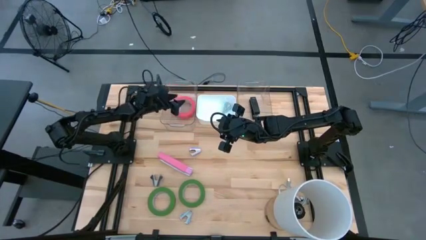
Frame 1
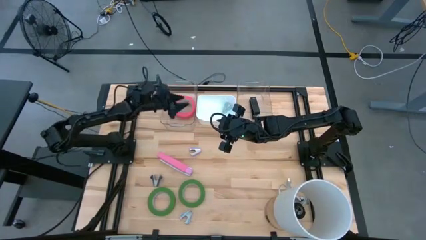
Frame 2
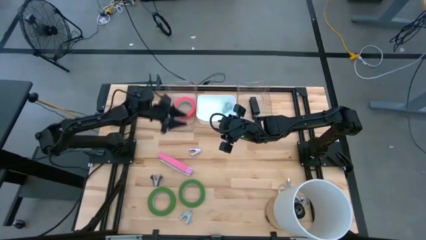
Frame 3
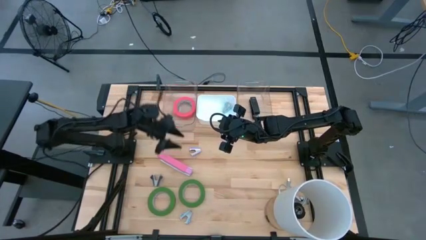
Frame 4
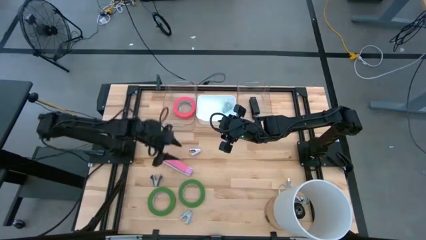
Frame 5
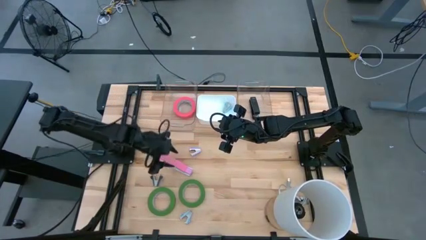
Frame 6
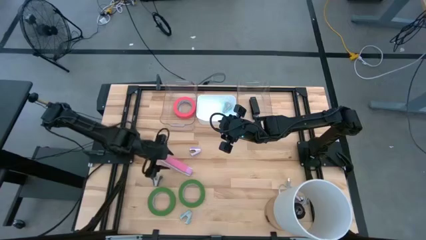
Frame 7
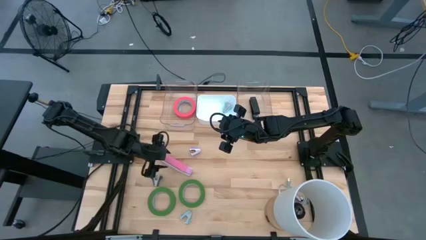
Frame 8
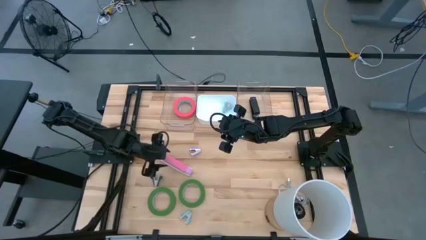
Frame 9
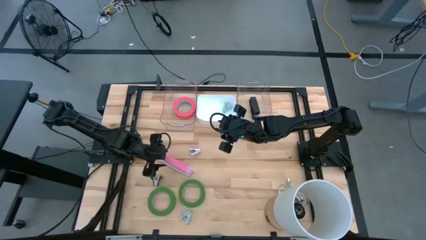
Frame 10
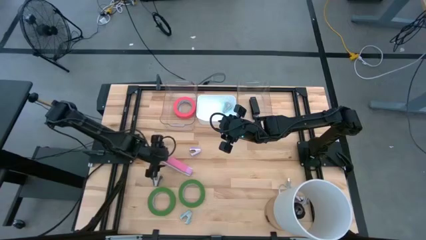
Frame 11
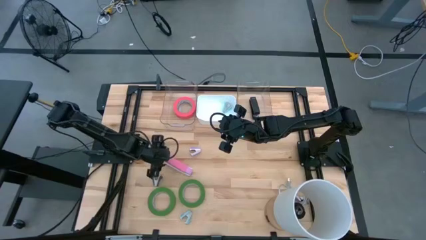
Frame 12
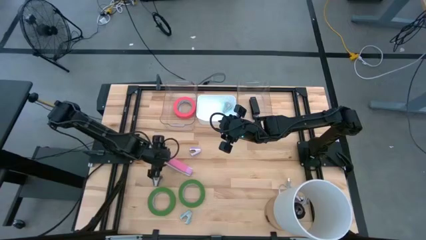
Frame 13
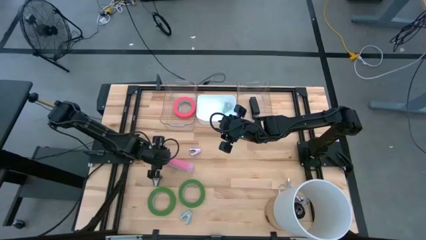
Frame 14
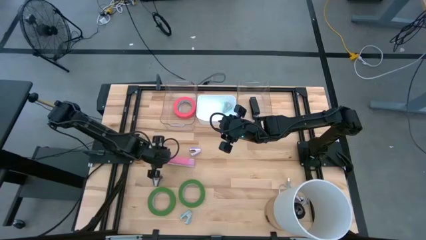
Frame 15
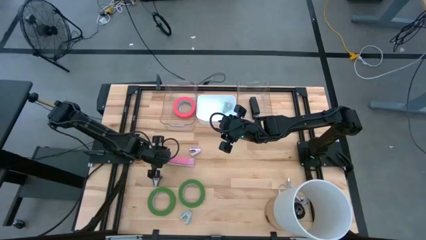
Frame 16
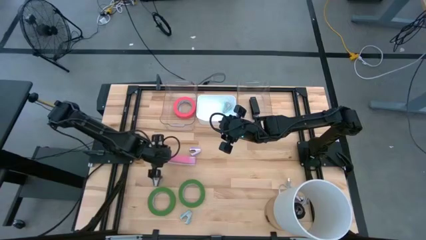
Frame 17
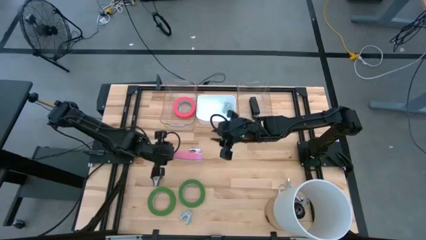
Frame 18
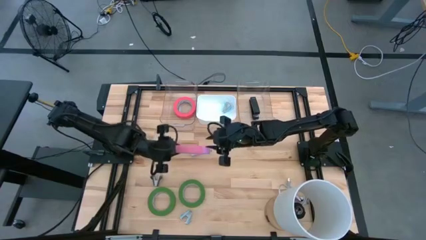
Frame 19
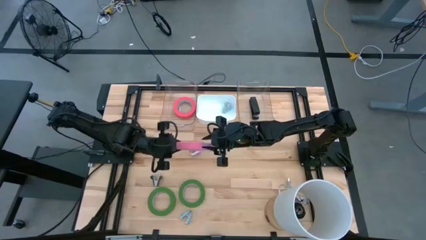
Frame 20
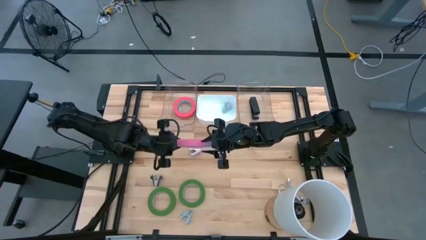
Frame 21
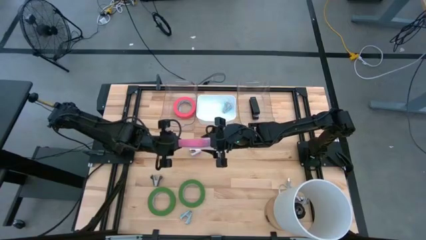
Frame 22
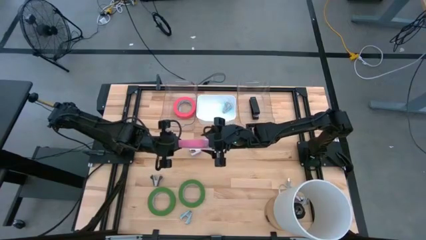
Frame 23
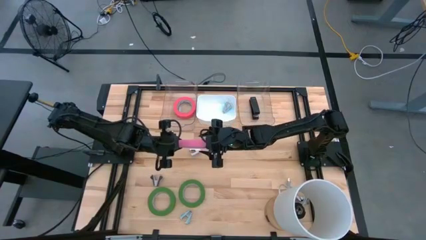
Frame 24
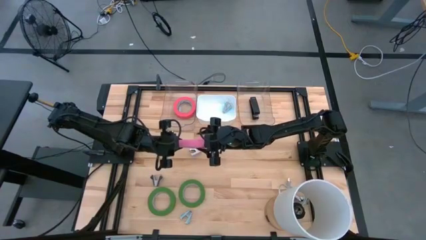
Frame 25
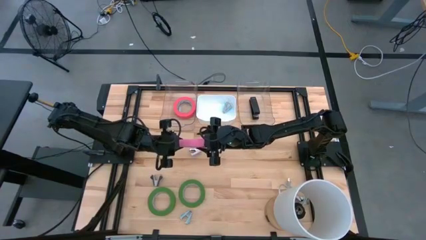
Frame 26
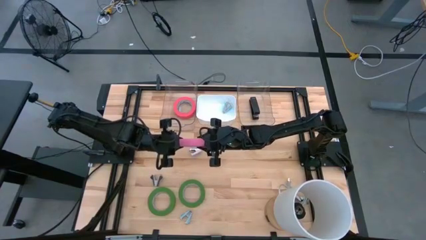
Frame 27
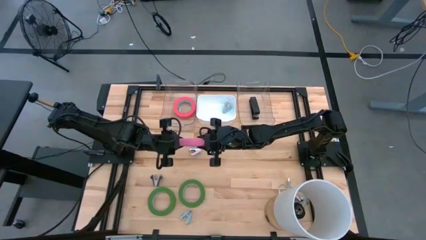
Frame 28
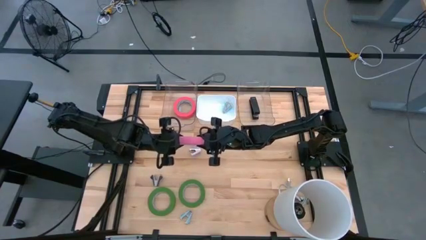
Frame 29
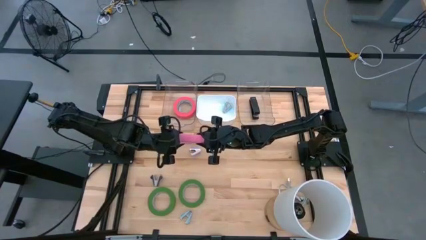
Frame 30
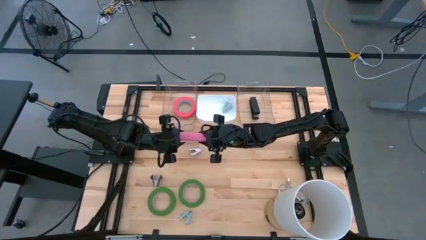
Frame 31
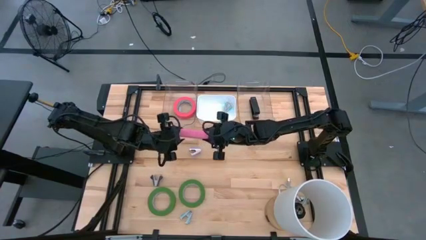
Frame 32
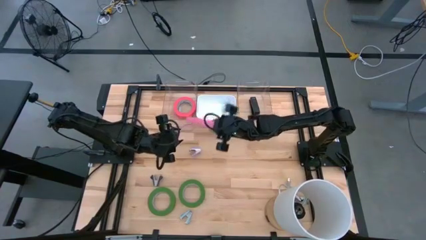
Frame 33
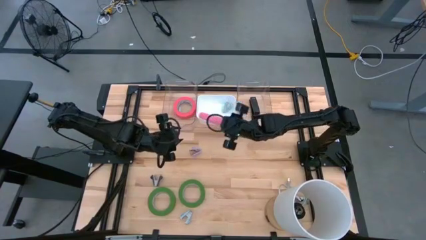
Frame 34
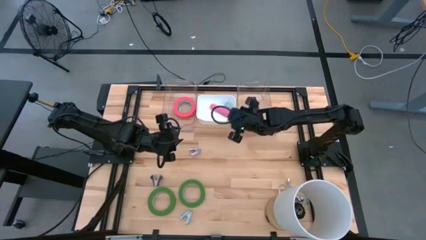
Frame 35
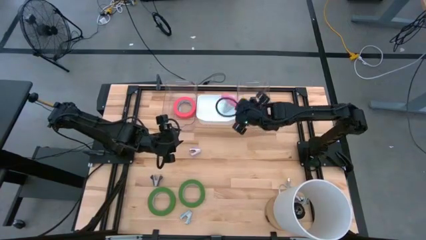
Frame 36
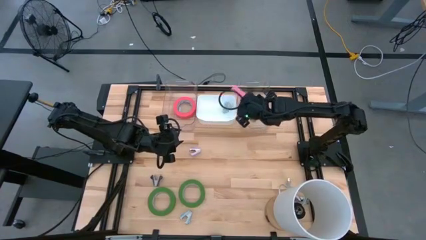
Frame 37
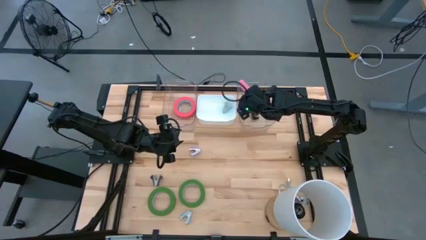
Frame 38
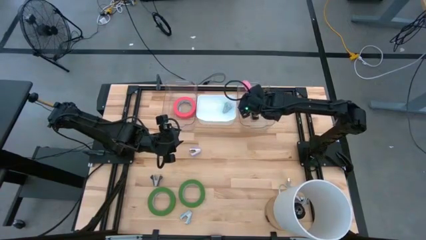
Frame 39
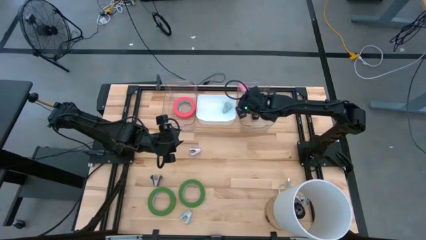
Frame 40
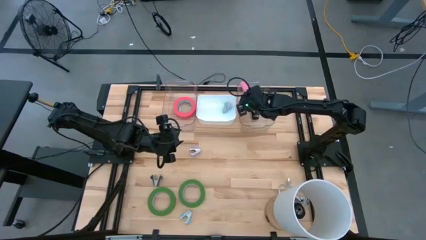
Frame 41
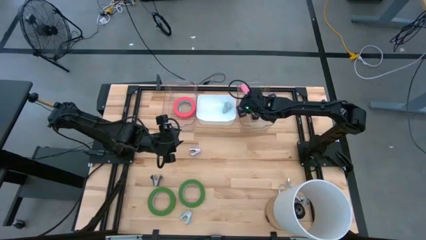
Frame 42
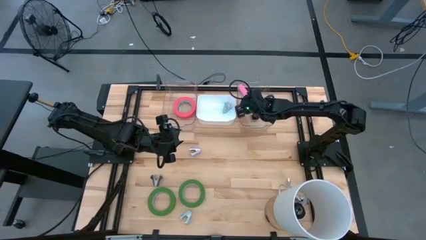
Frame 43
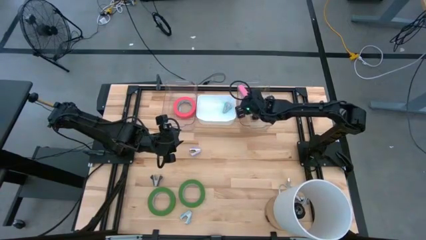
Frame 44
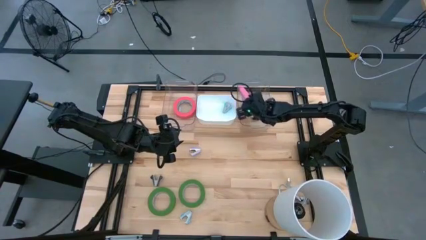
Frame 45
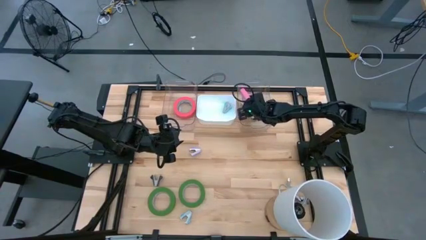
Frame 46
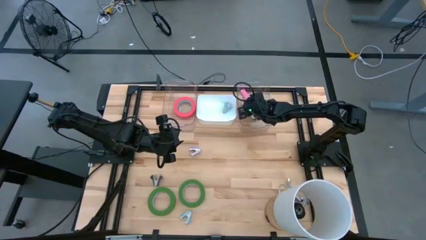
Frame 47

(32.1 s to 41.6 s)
Task: Pick and place Stapler, Stapler remover, tape
Put the pink stapler into the right transparent bin

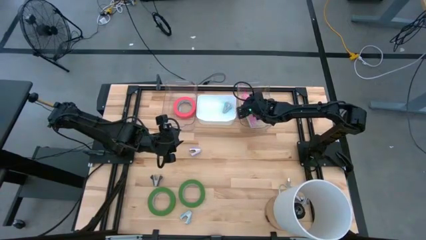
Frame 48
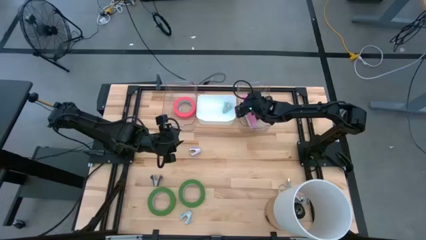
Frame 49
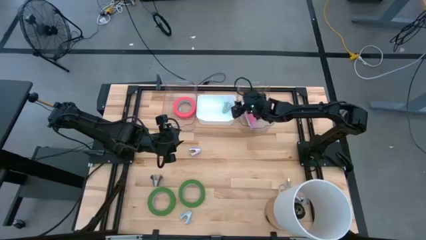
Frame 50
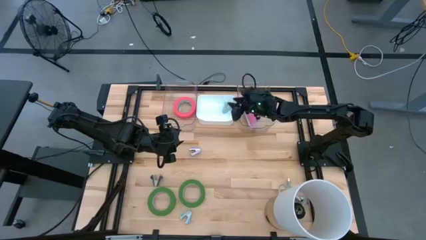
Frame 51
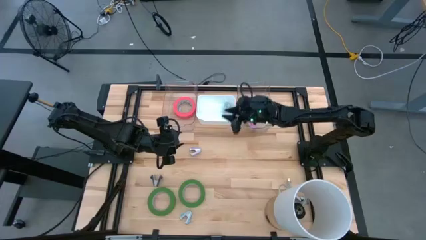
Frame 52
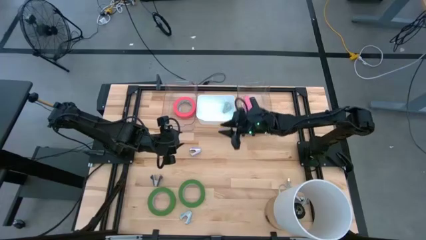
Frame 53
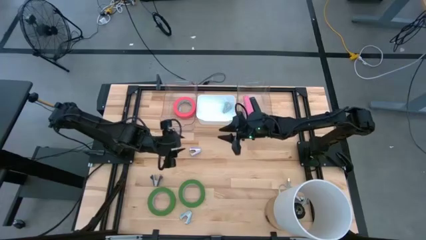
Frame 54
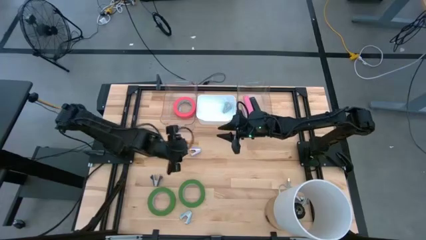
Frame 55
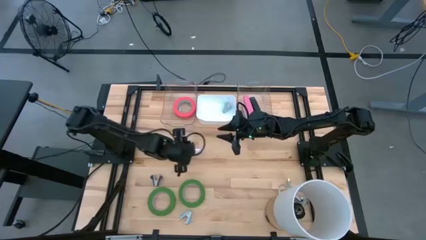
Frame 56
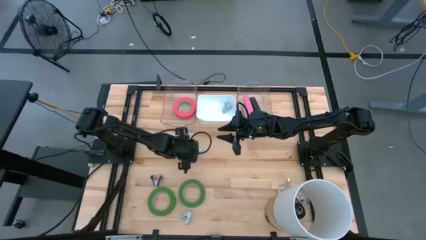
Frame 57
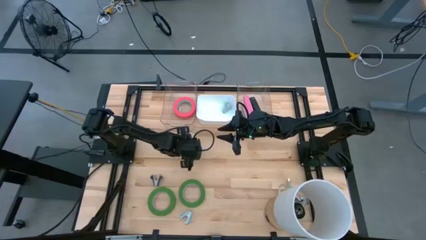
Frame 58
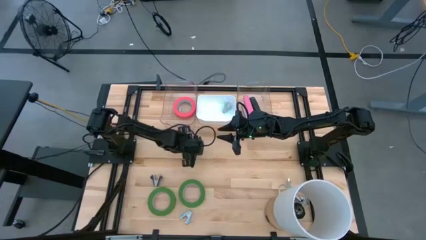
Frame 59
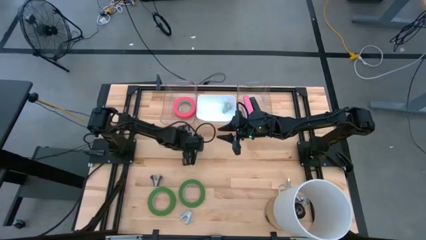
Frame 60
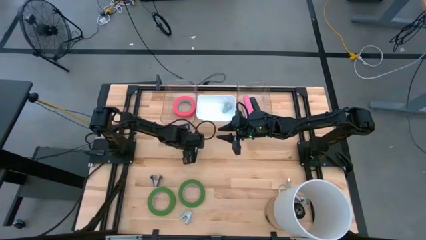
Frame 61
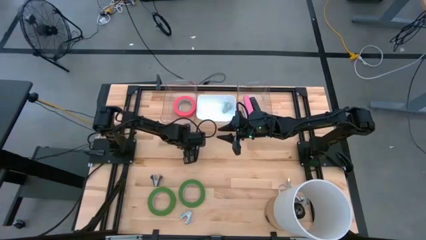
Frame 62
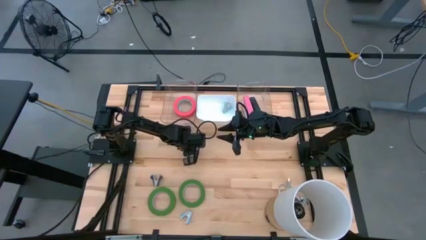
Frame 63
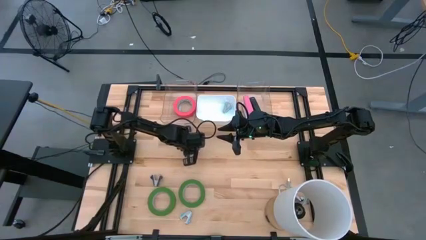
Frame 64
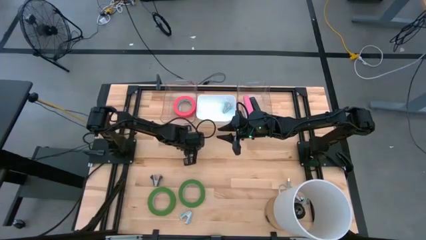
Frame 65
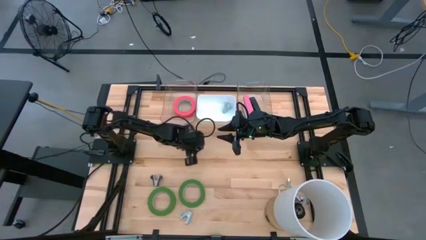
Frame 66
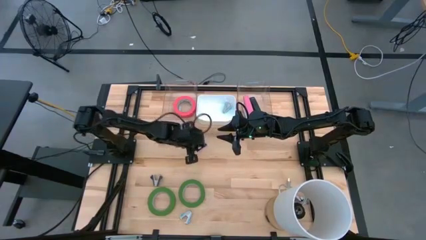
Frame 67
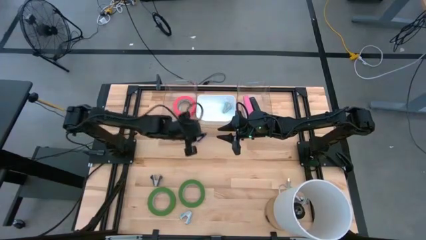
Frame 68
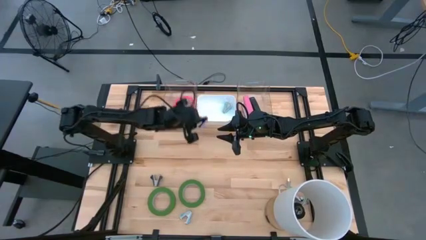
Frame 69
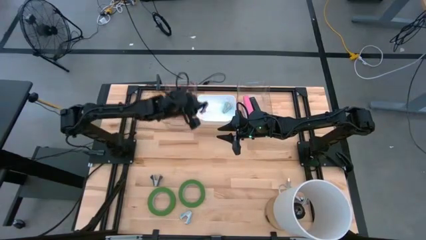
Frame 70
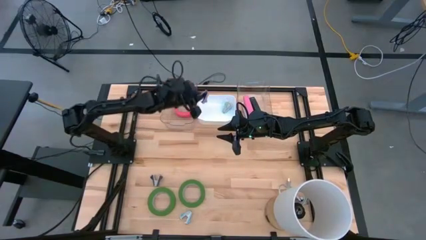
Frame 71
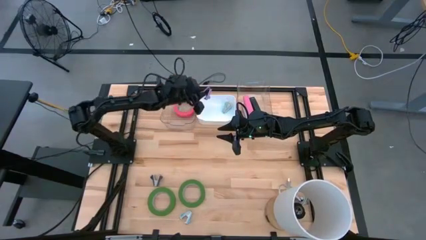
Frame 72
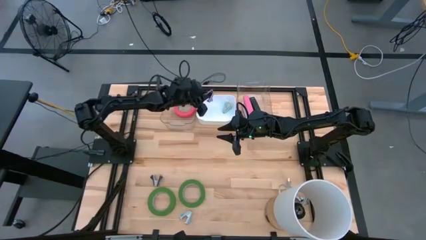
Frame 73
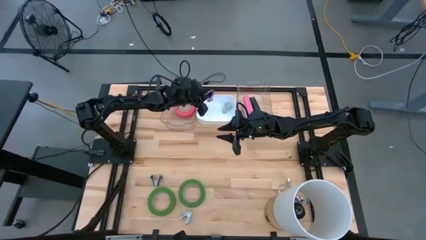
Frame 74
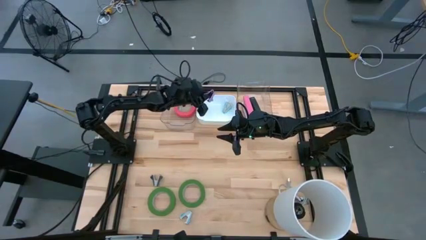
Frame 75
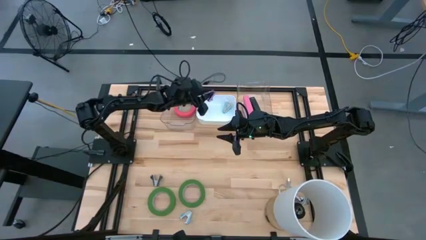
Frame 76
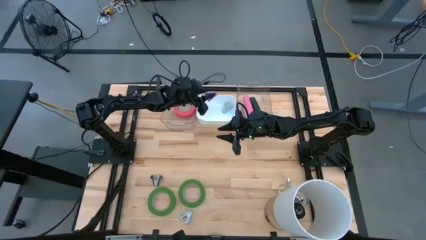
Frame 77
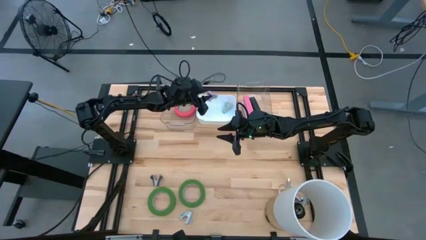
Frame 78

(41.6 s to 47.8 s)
Put the purple staple remover into the white bin

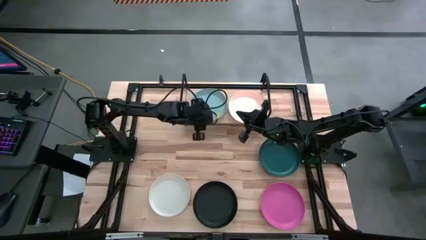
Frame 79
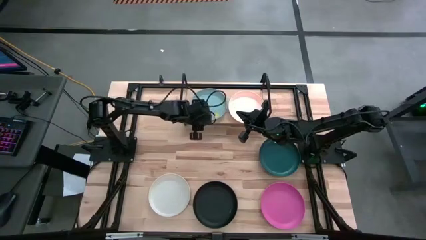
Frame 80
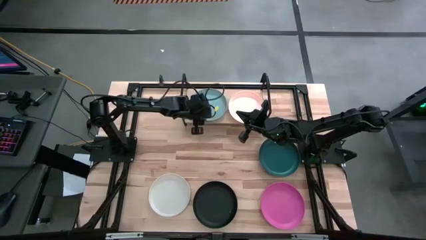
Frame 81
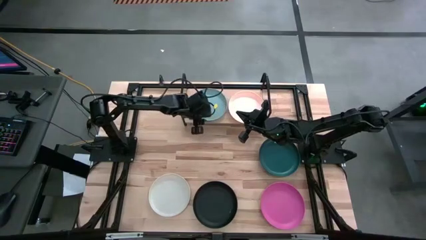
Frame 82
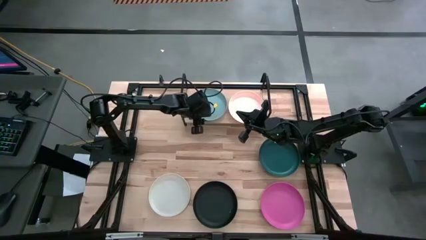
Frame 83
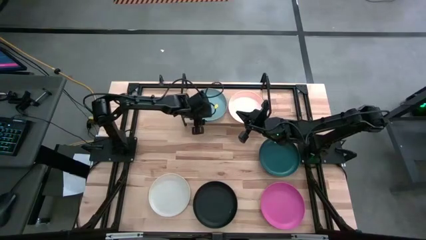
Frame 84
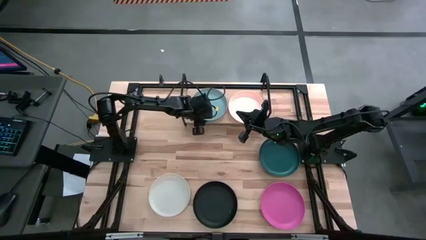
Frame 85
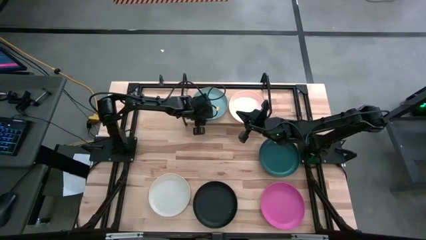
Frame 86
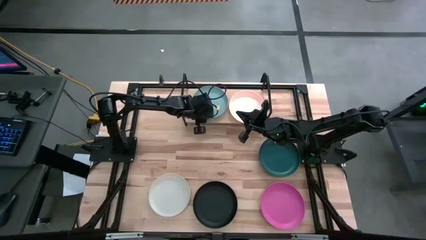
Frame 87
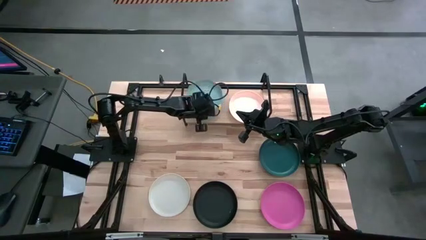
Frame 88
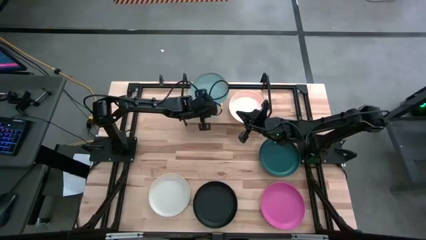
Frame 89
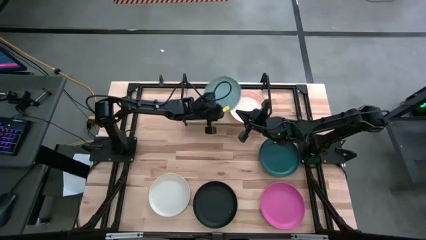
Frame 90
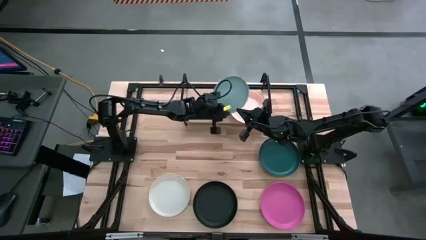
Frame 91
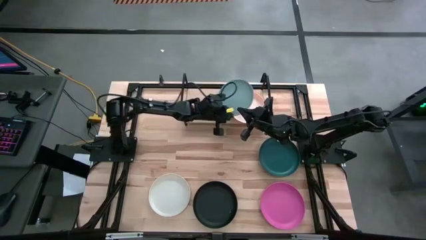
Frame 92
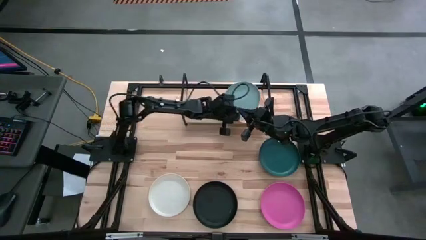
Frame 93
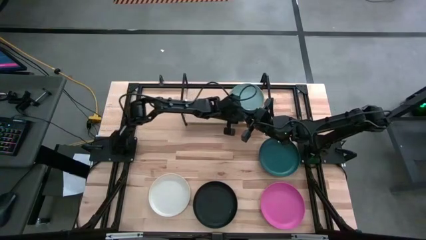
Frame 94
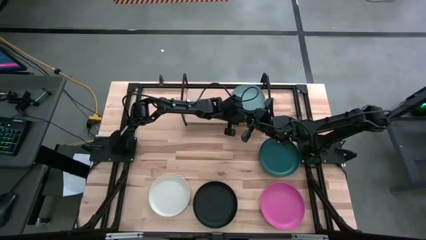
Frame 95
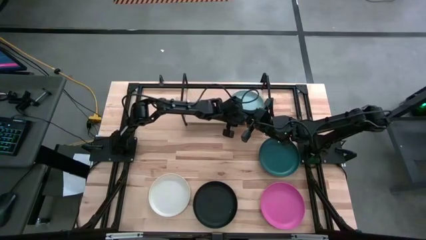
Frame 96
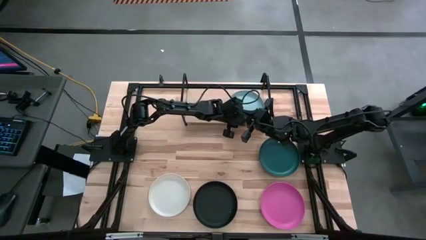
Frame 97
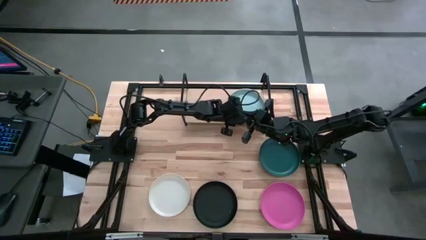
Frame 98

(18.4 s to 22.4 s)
Task: Place and stack plates onto a shelf
Stack the light blue plate on top of the light orange plate on the shelf
